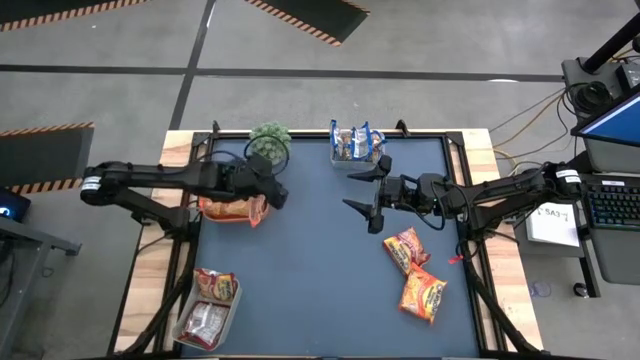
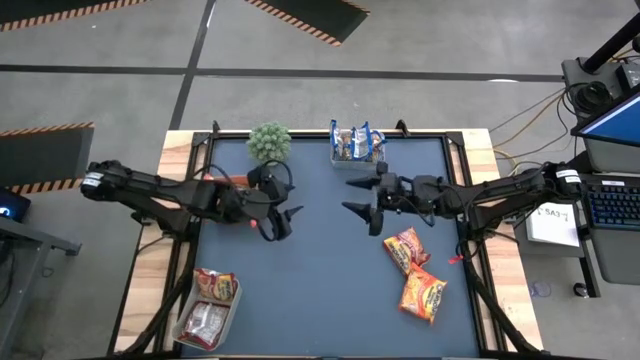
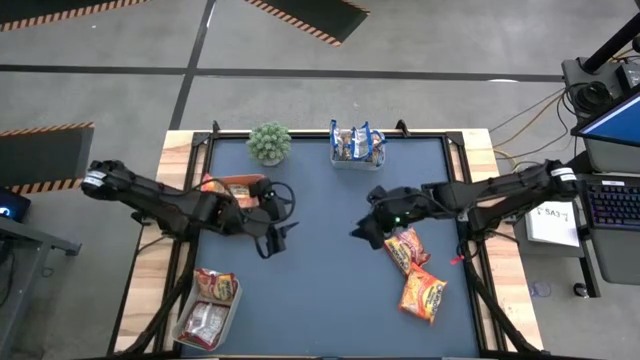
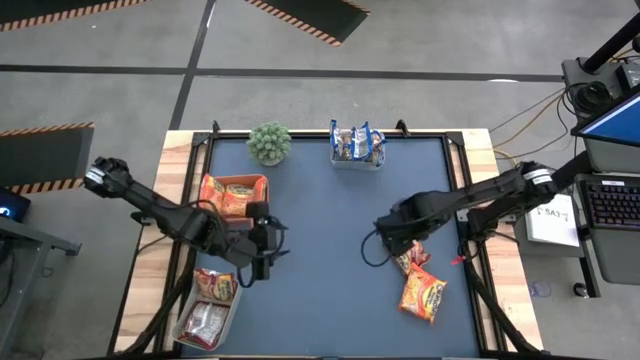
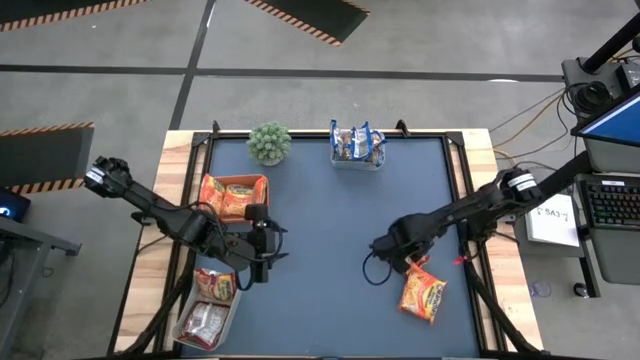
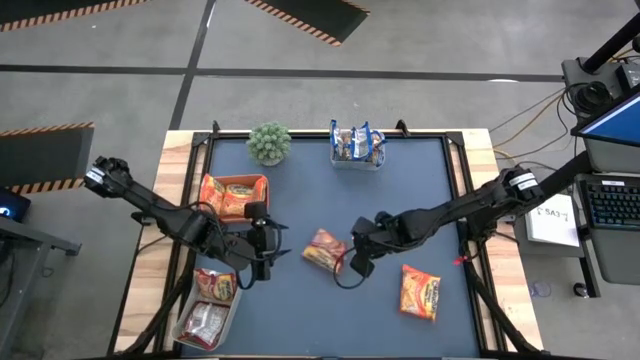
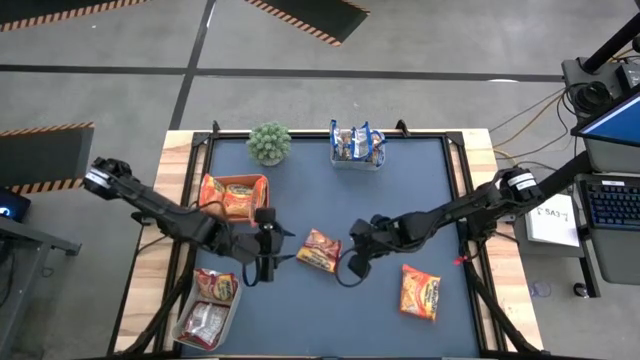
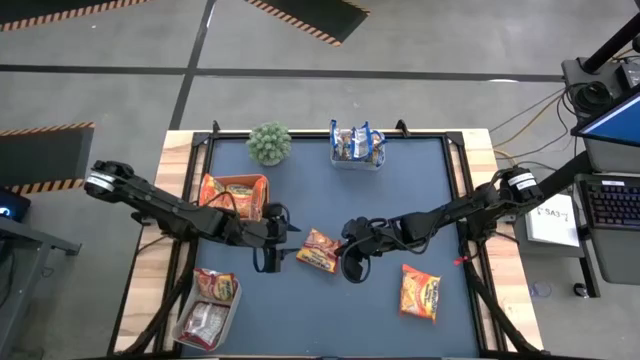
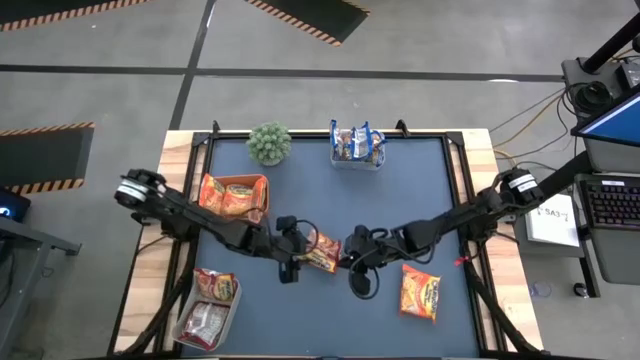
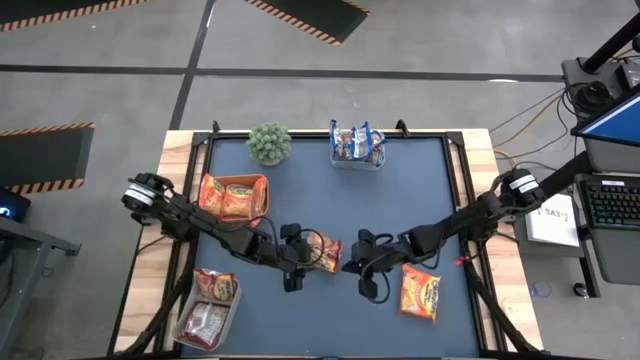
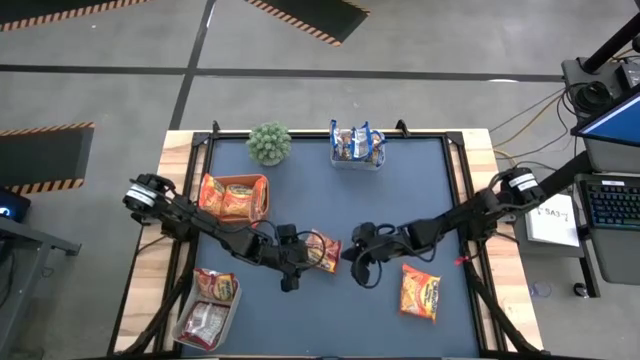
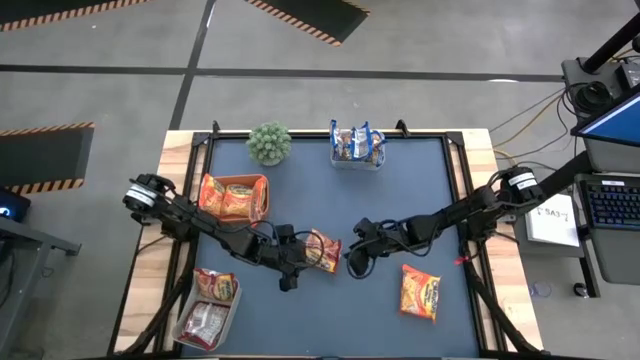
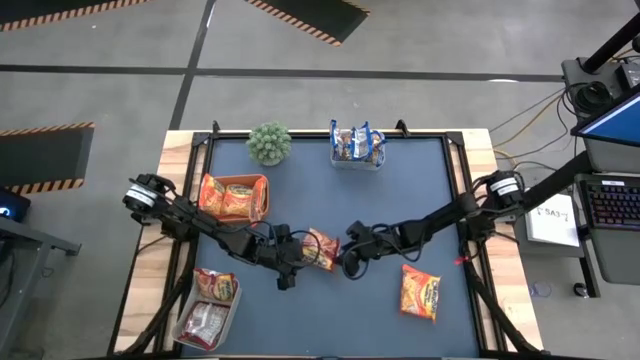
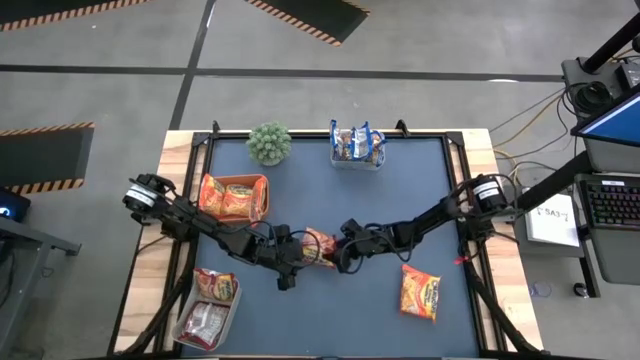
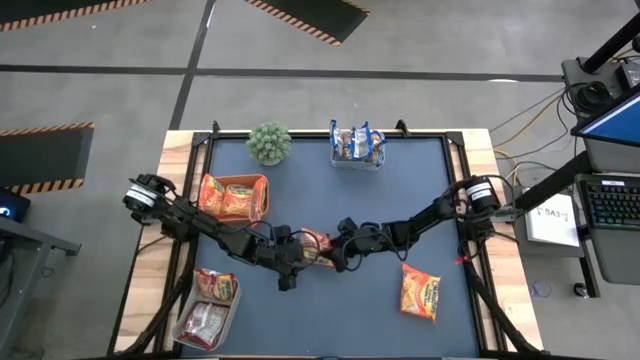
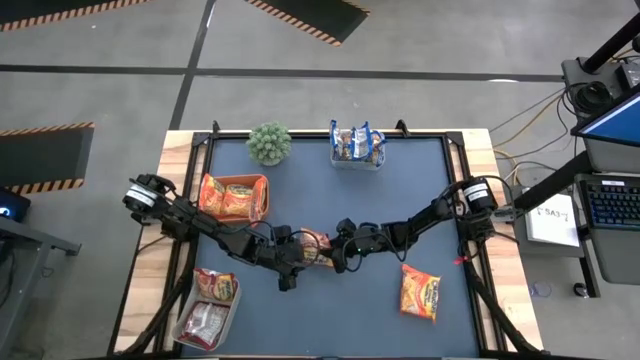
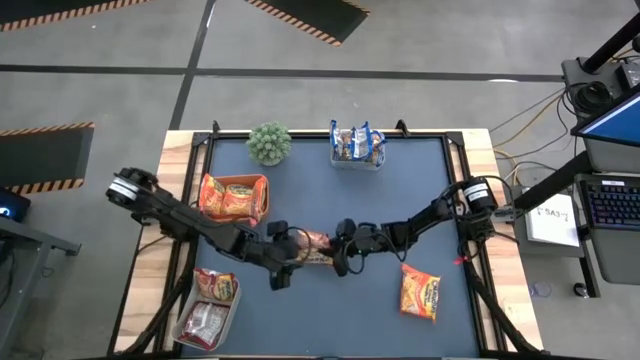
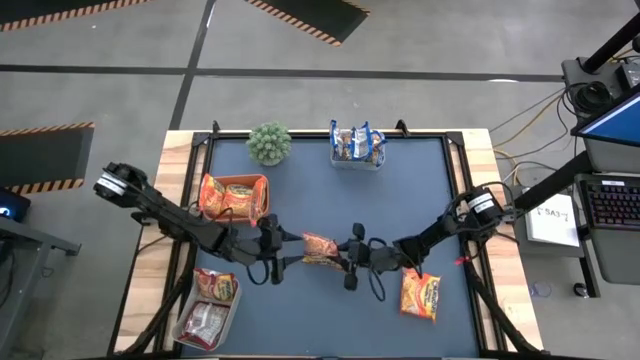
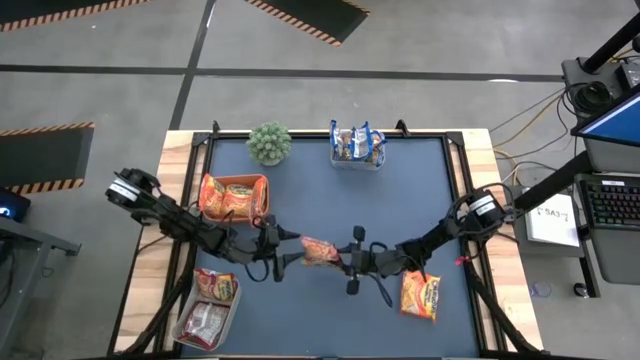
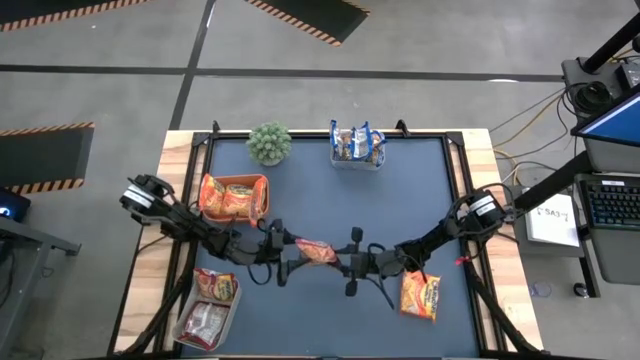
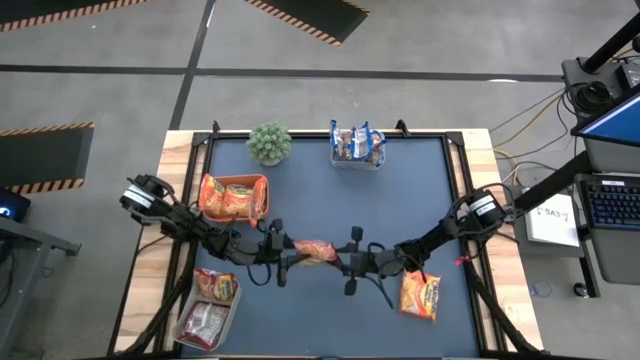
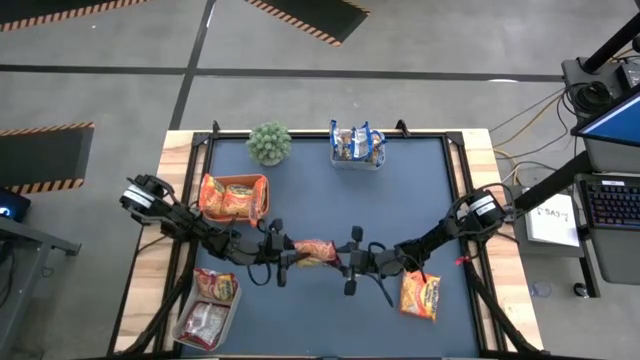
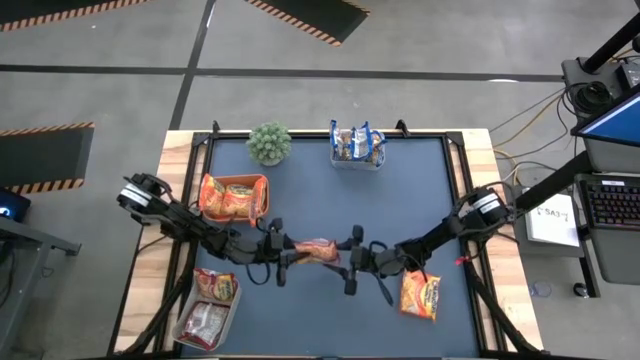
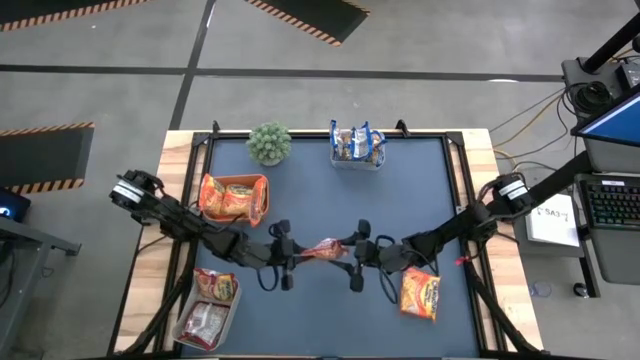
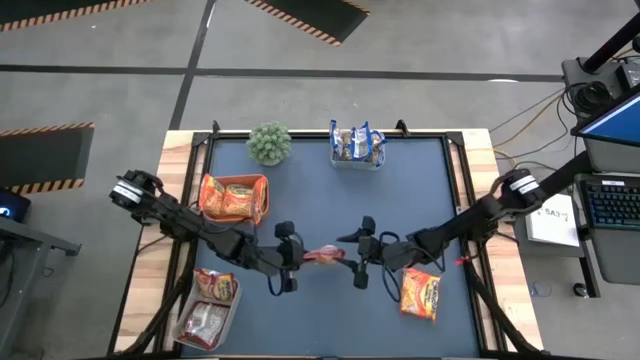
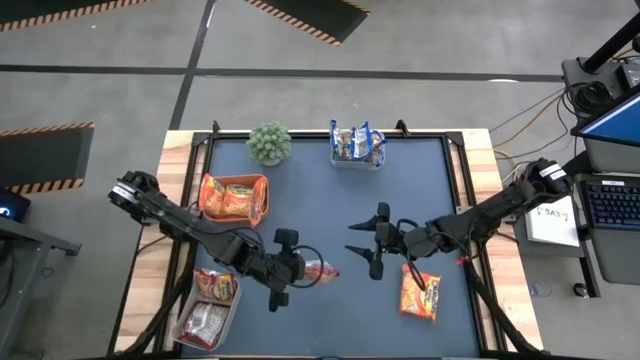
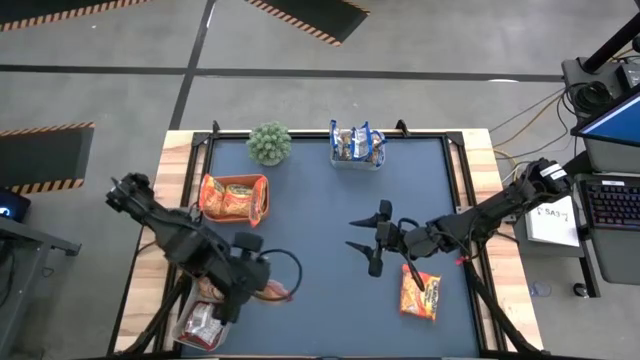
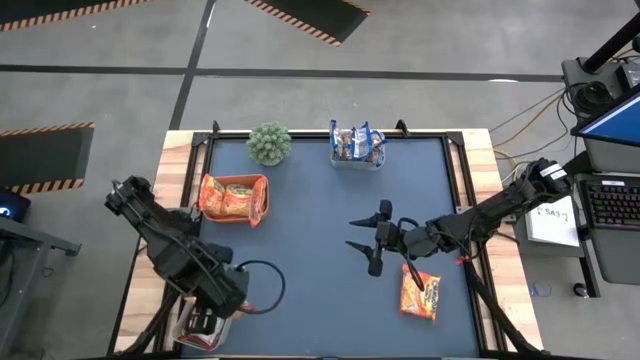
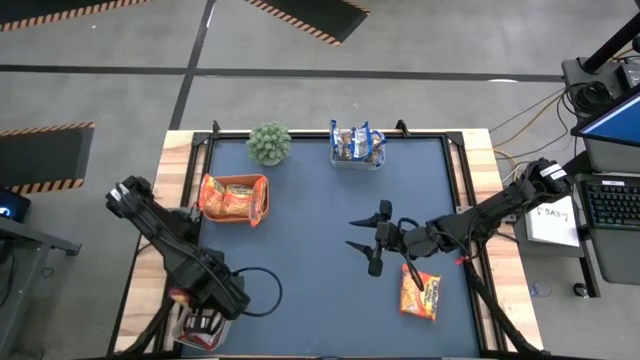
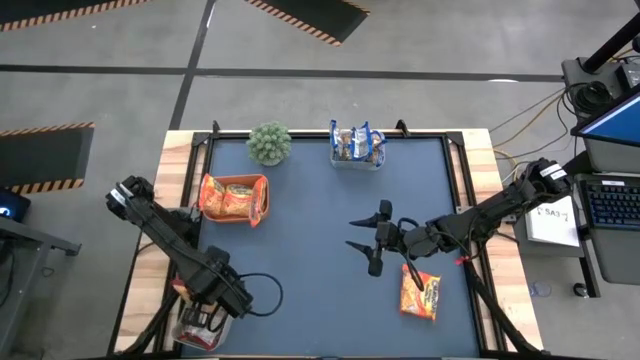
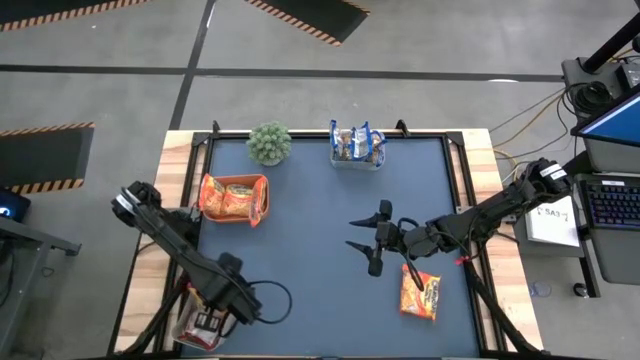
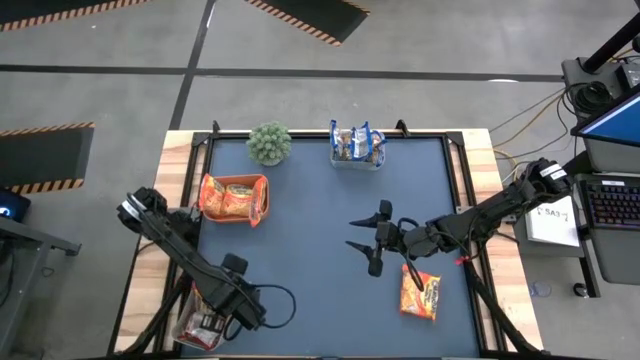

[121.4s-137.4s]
Task: Sort Maruchan noodles
Put the red noodle pack into the gray bin

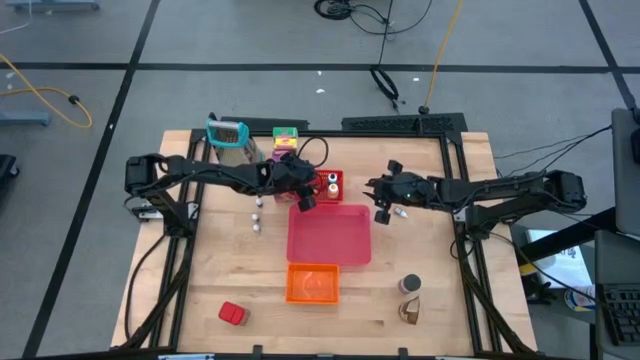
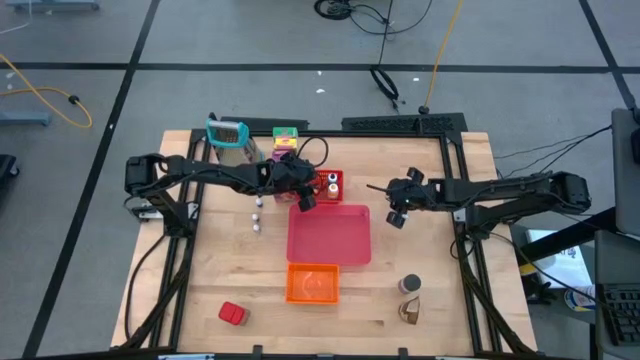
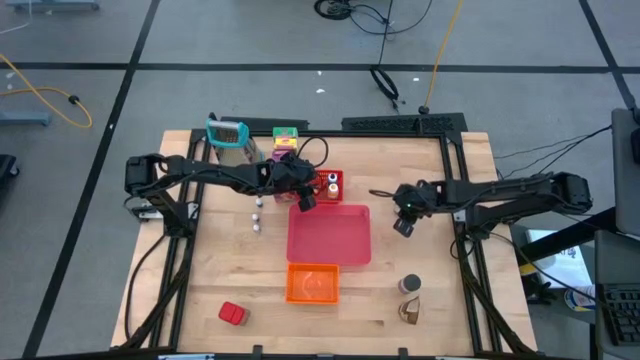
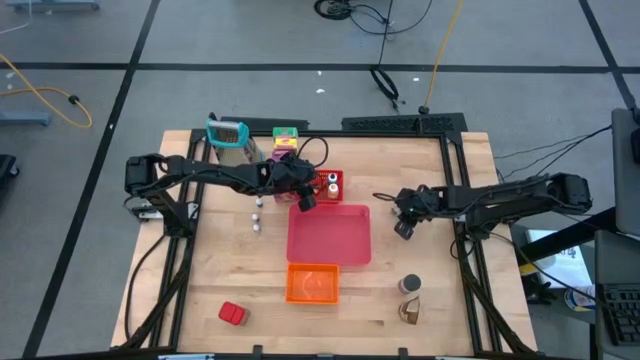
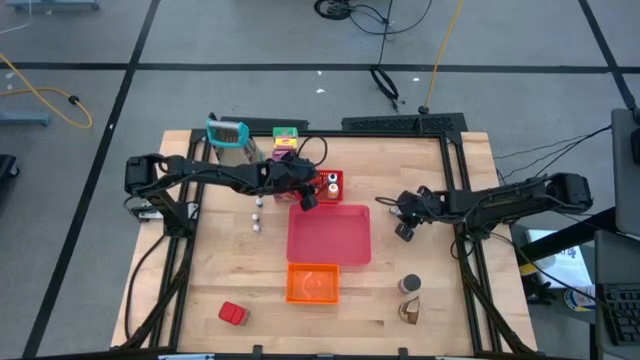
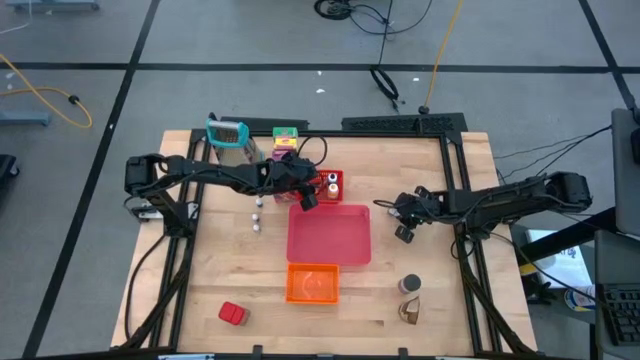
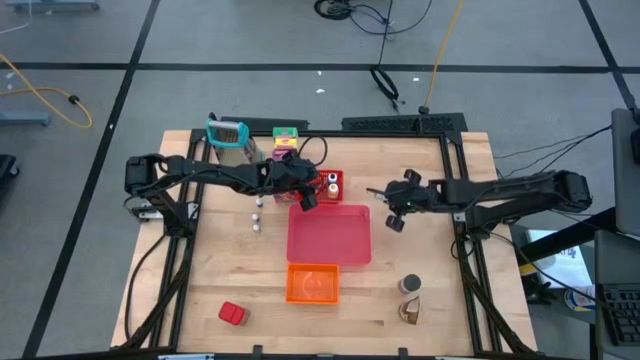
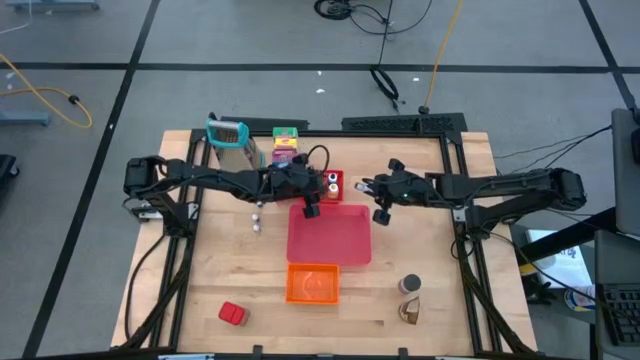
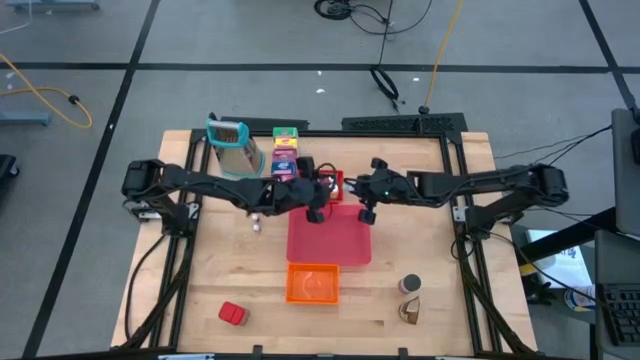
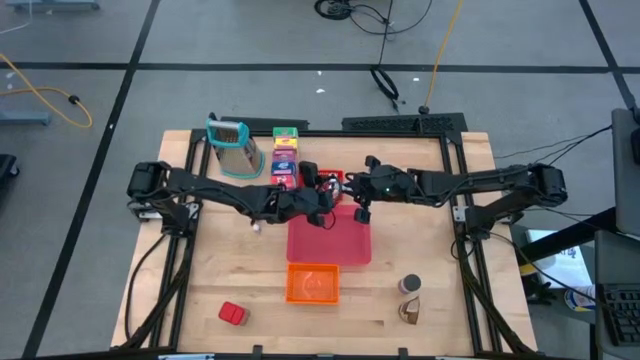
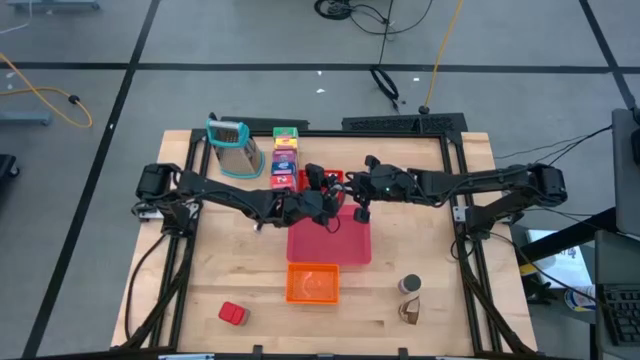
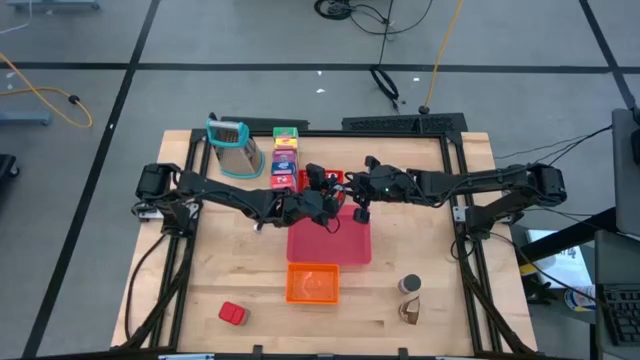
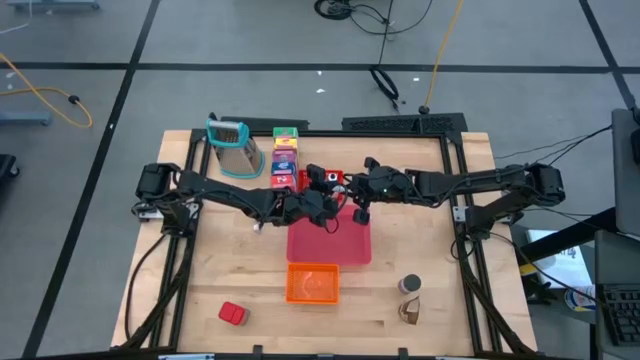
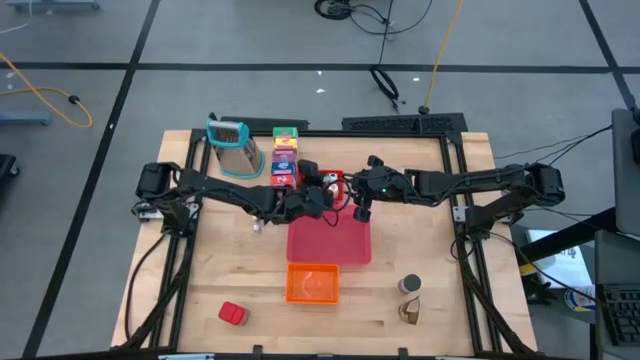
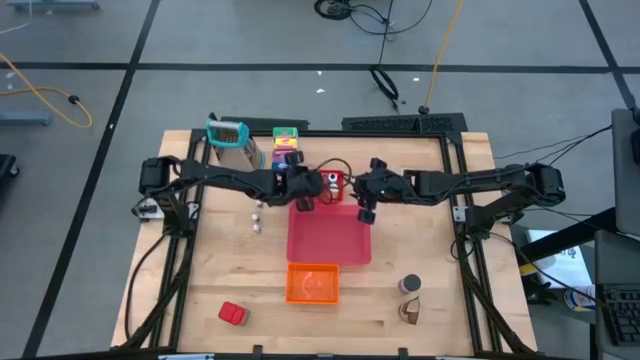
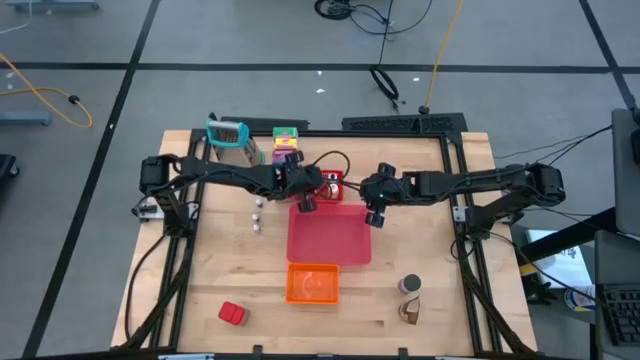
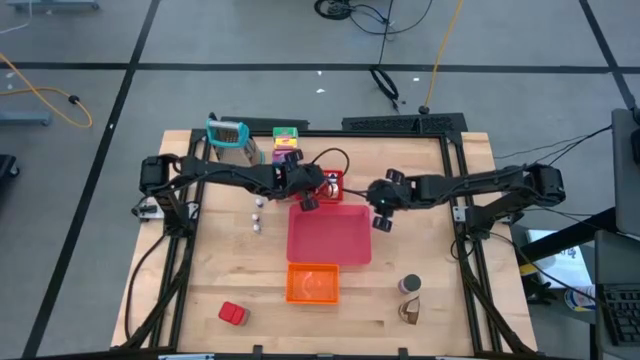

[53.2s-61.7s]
Task: Pick & Place Kitchen Items
Put the green food coloring bottle into the red bin
